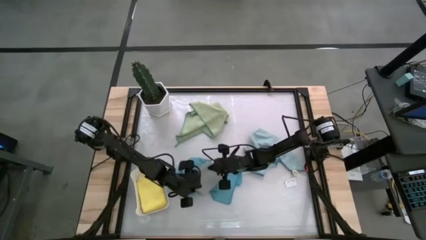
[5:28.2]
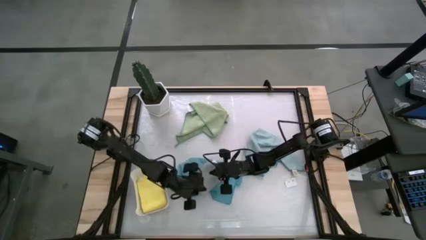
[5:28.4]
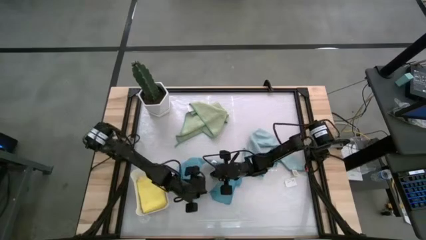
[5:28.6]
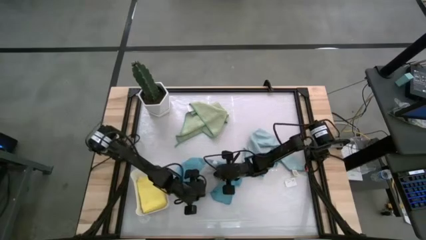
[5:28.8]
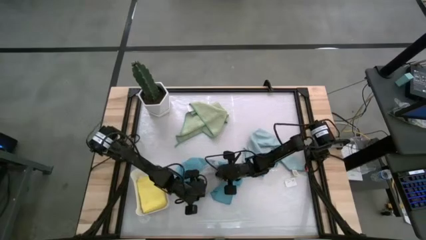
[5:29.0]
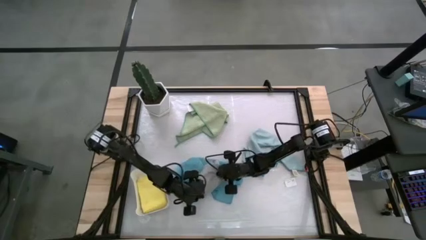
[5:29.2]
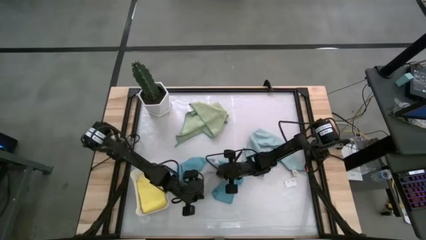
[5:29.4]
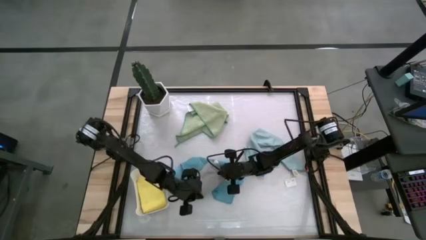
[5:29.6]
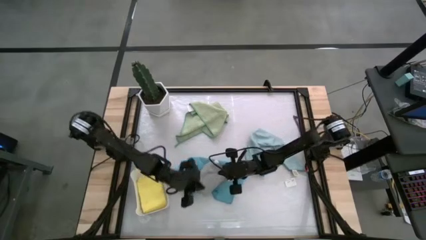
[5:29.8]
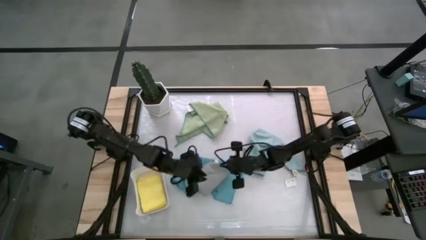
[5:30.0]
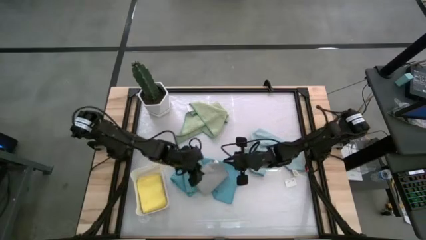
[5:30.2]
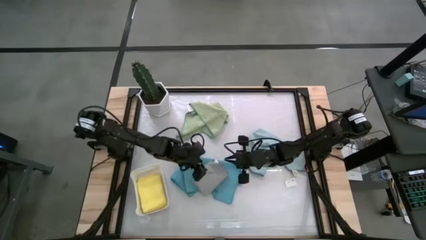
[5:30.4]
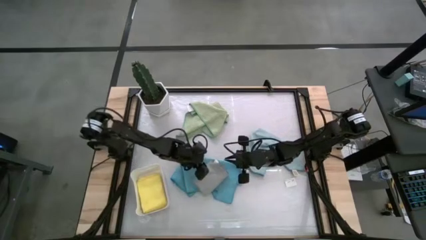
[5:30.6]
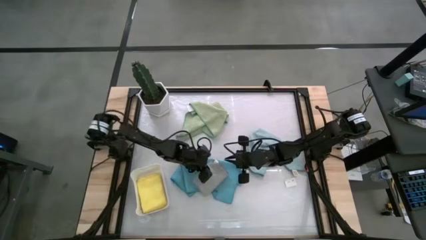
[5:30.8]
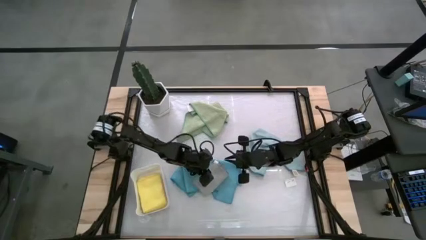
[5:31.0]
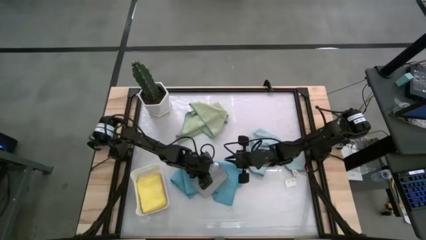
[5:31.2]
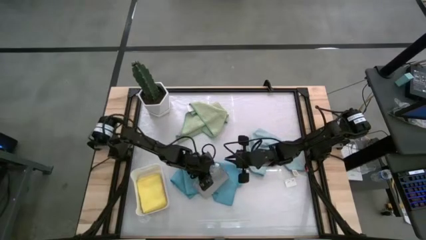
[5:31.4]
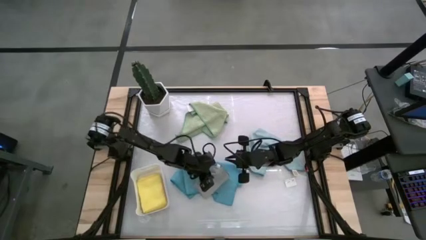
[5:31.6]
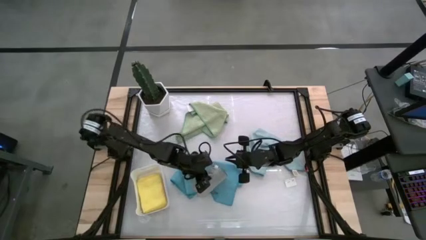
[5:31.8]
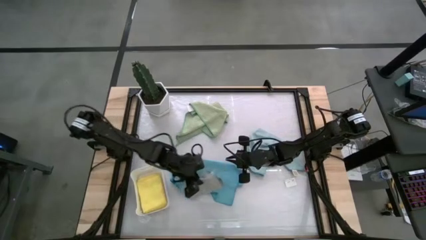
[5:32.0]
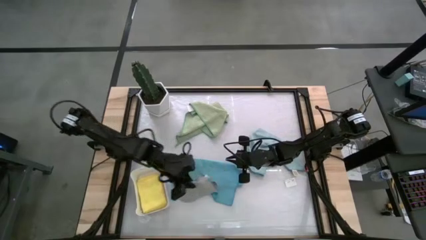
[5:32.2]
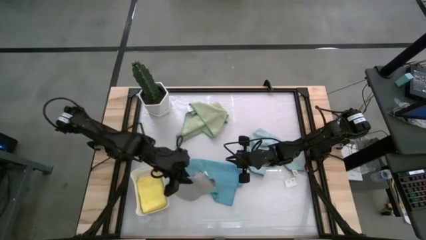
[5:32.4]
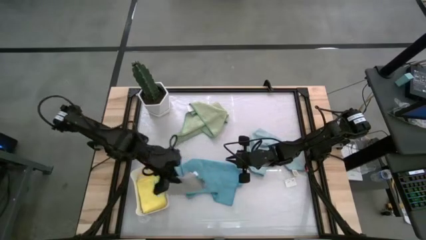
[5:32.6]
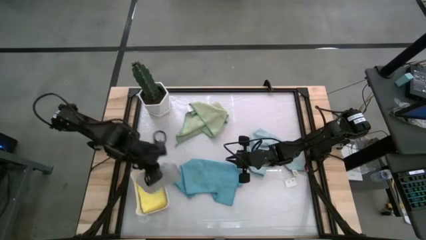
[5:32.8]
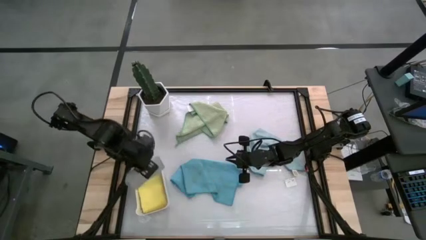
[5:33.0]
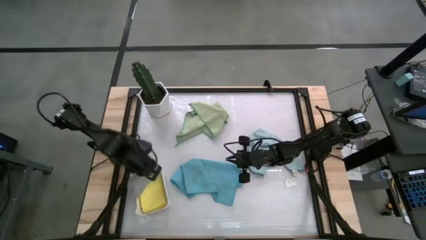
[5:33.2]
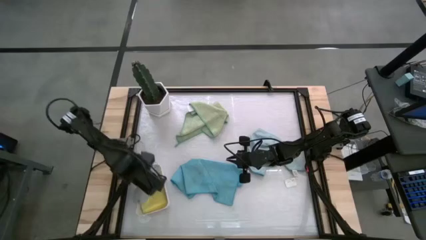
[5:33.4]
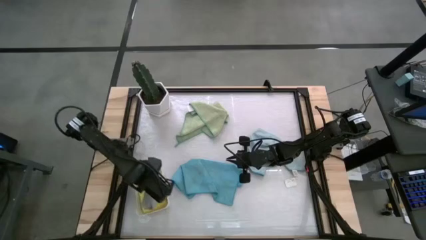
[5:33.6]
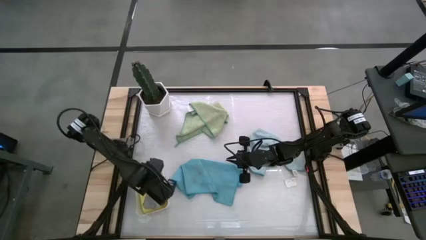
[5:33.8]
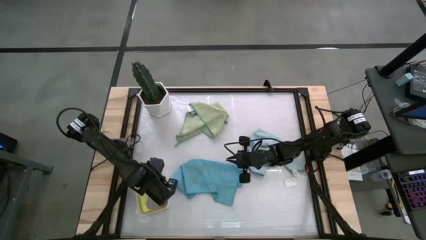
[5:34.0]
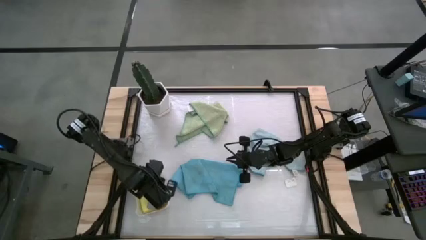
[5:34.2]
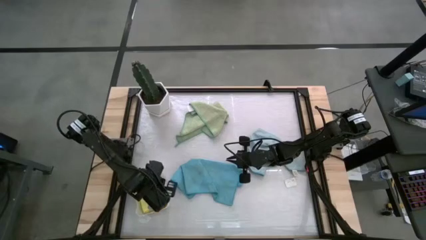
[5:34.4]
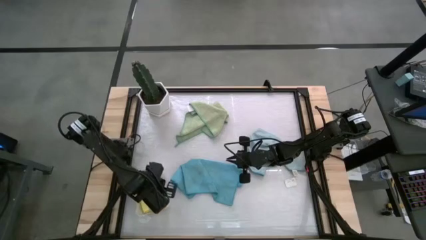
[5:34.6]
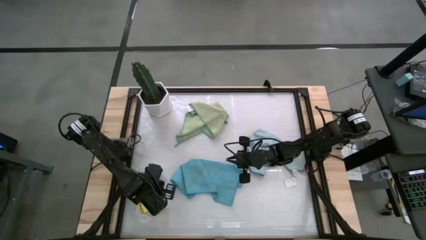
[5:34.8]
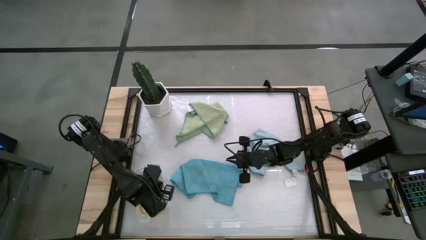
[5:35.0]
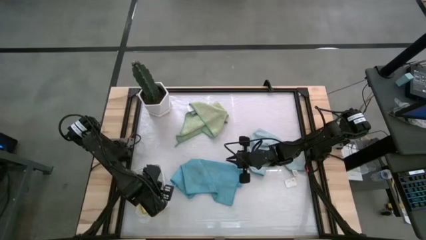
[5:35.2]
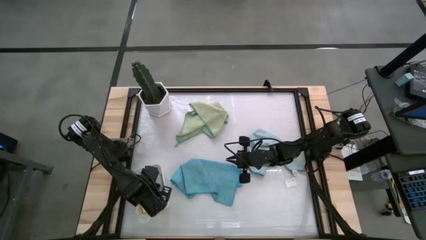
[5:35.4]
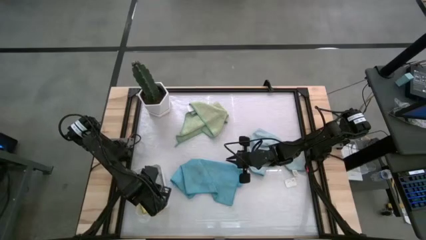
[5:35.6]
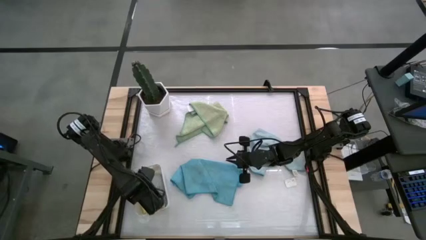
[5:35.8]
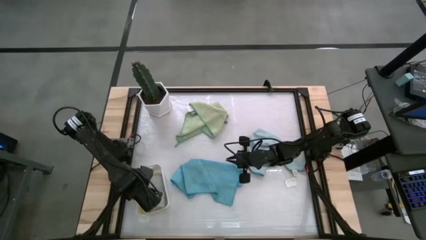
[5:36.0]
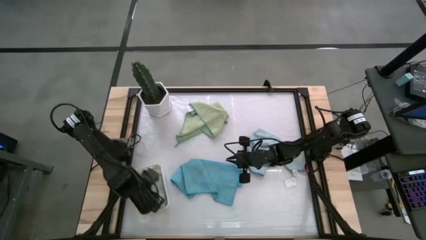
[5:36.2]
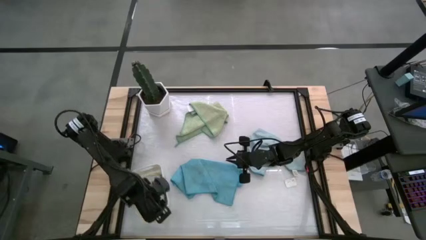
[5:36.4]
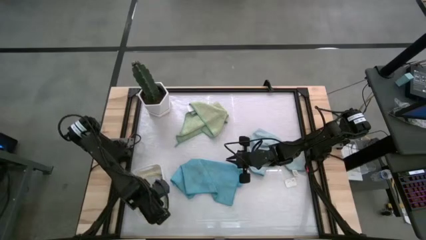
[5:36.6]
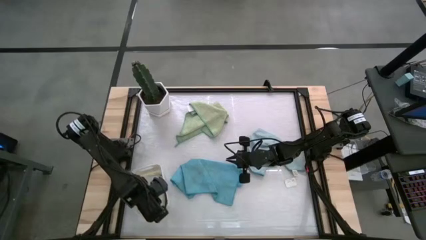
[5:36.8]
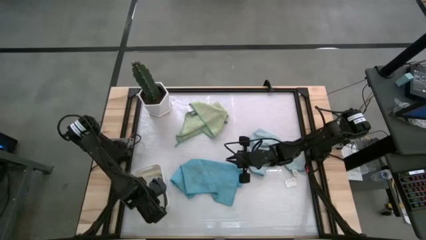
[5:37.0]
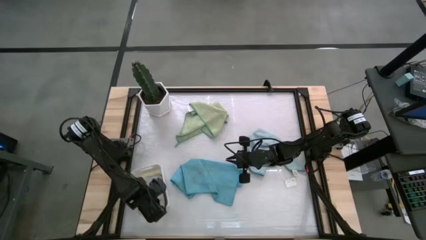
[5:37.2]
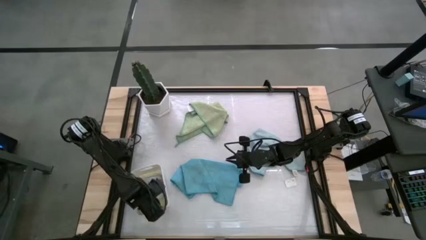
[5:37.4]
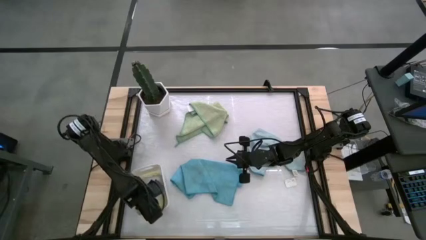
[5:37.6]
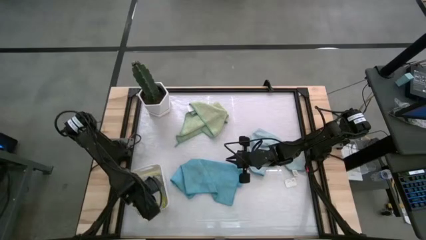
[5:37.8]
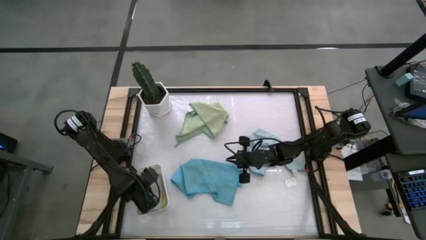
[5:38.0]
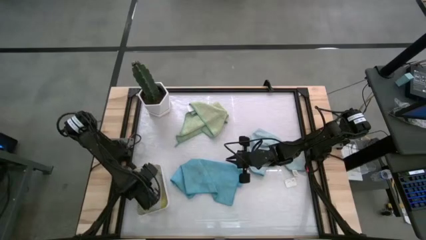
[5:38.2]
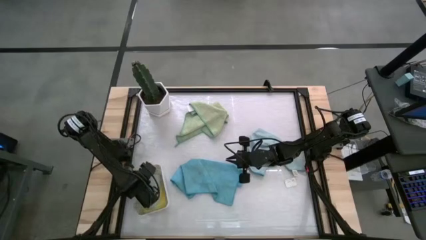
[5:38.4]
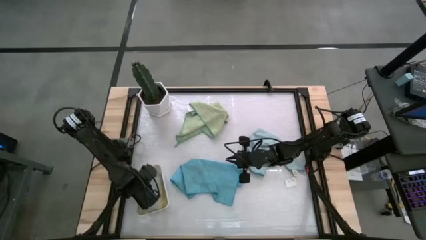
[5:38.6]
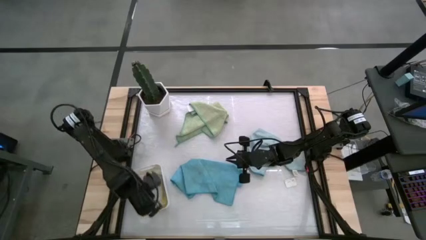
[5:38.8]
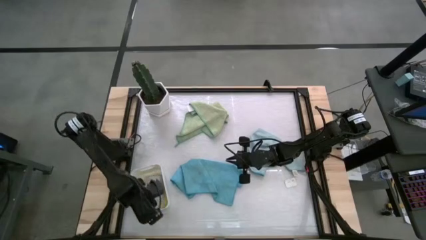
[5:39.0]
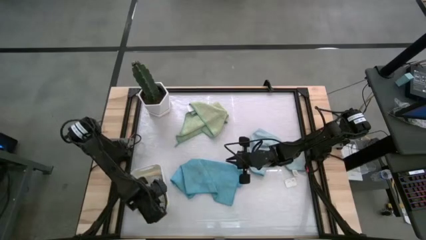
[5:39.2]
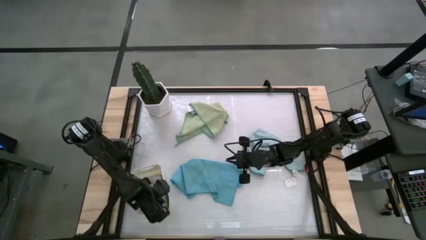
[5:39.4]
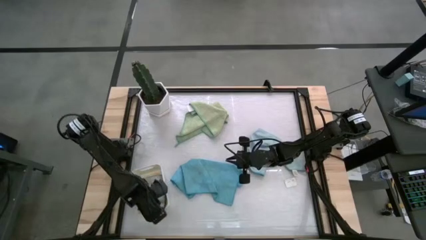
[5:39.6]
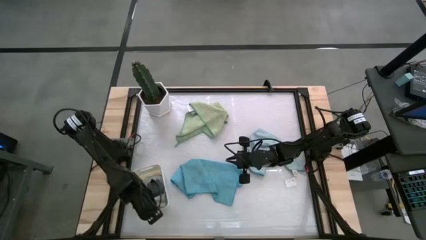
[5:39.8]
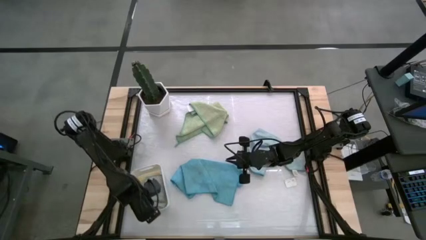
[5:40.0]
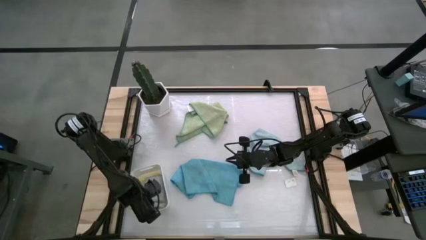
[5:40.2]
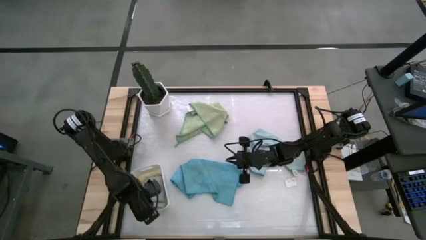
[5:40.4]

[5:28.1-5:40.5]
Task: Fold microfiber towels
Put the gray microfiber towel into the white bin

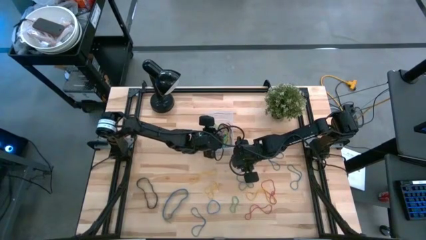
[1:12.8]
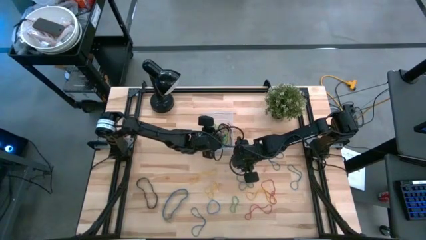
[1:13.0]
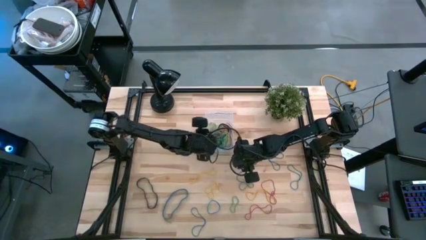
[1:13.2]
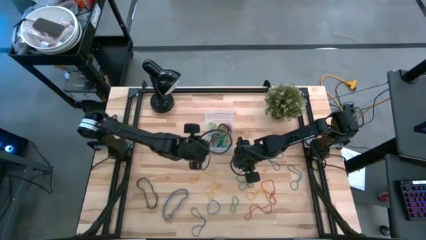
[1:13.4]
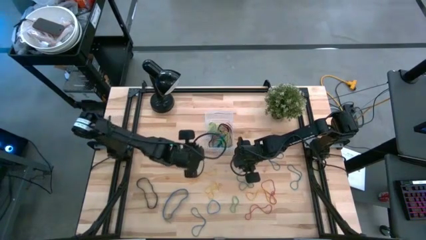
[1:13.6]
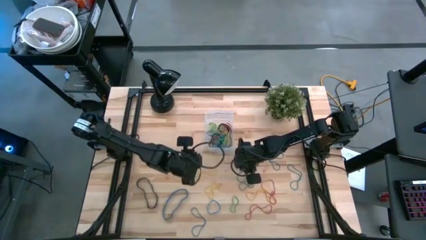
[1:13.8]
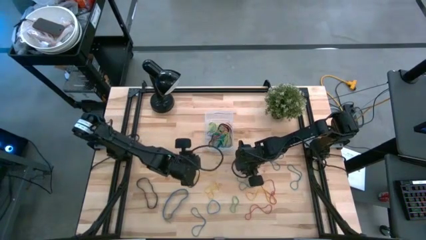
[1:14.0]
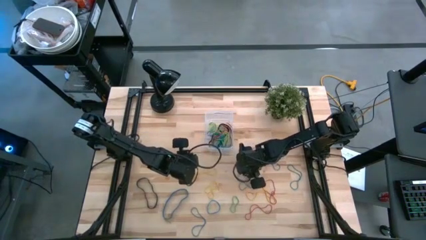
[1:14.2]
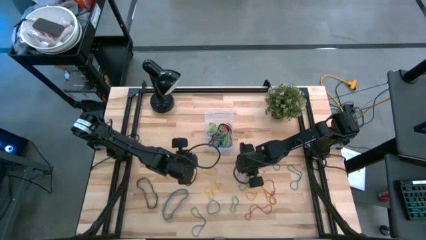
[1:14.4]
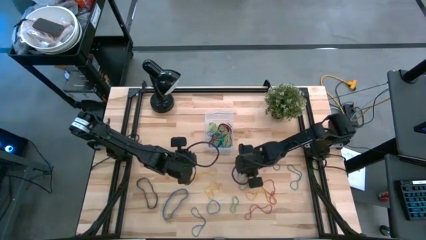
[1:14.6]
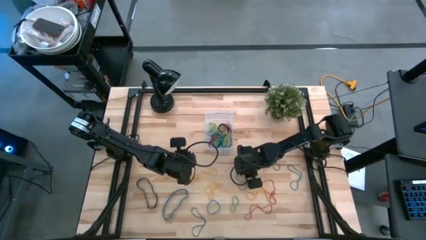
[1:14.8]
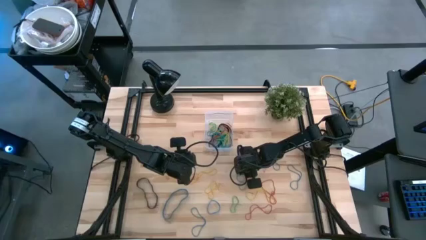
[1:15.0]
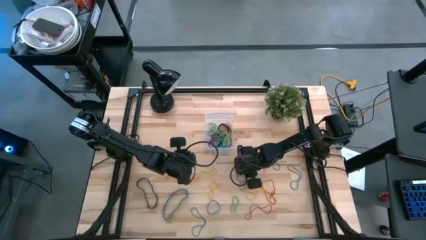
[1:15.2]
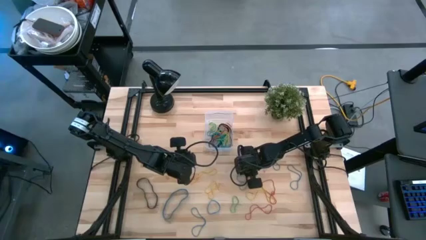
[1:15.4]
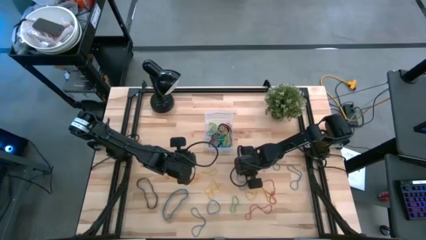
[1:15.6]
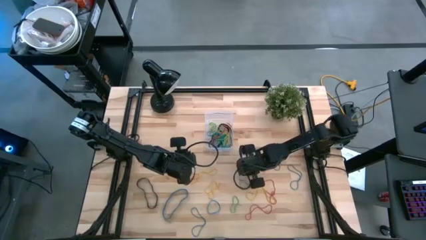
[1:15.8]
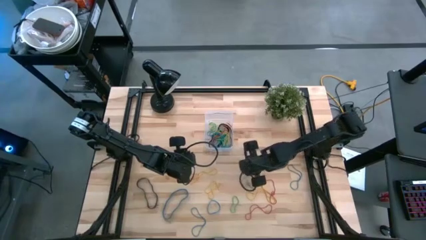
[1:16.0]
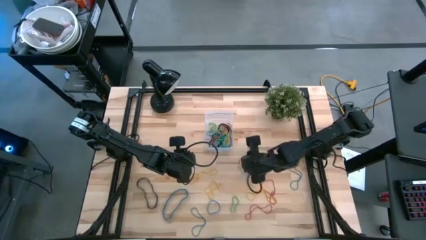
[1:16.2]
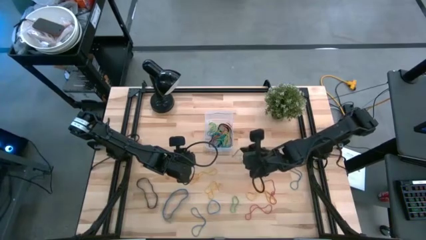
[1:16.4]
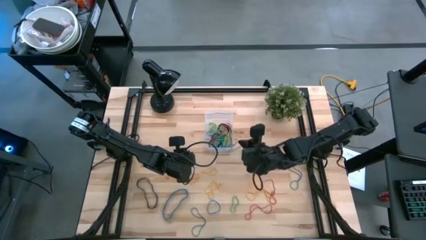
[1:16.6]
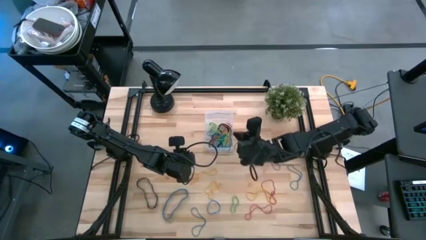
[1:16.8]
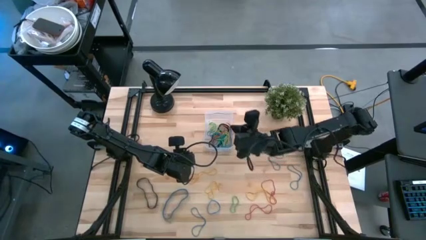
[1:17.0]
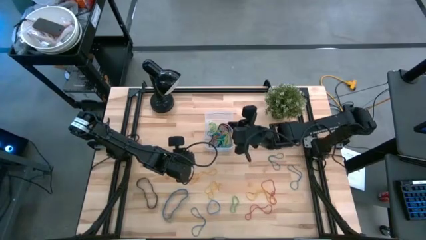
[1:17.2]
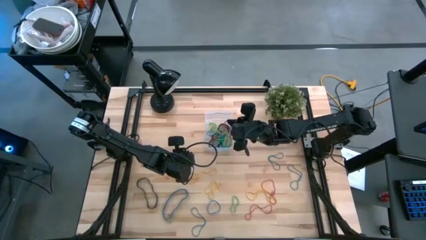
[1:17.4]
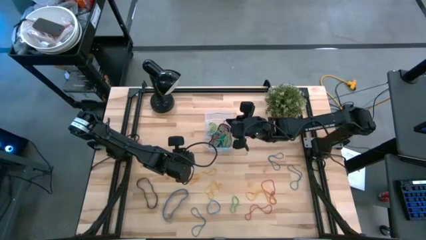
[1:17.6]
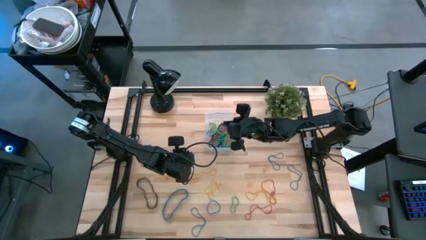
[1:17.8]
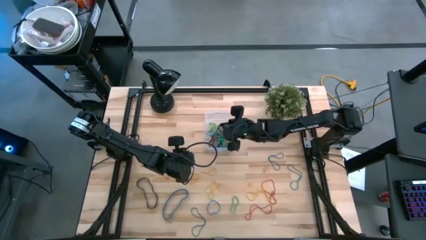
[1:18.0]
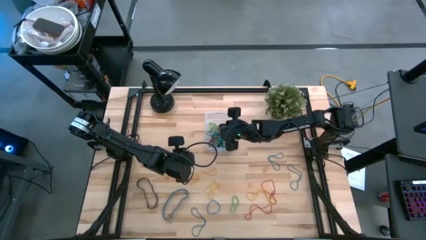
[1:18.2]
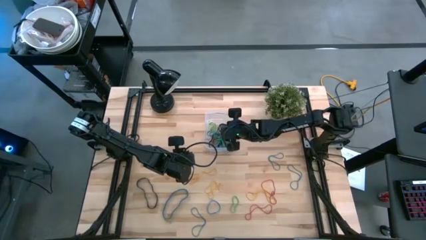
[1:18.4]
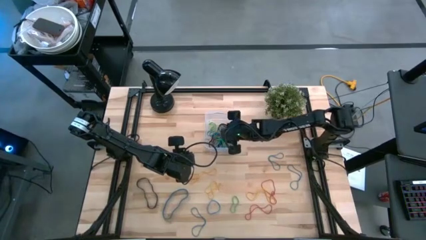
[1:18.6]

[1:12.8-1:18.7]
Task: Pick and place rubber bands into bin
Put blue rubberband into the transparent bin
